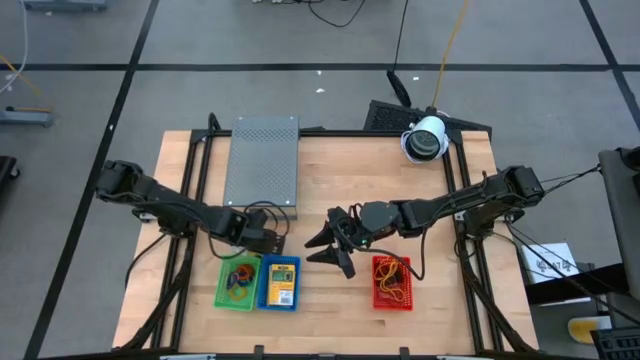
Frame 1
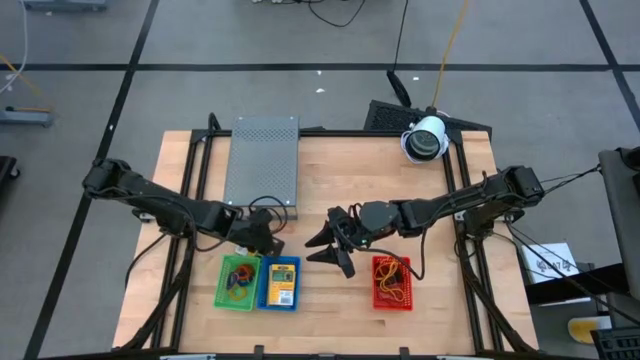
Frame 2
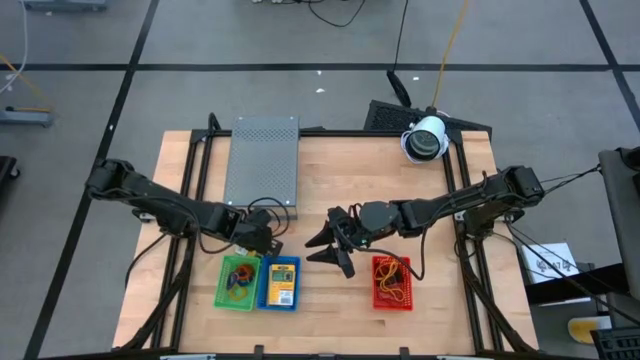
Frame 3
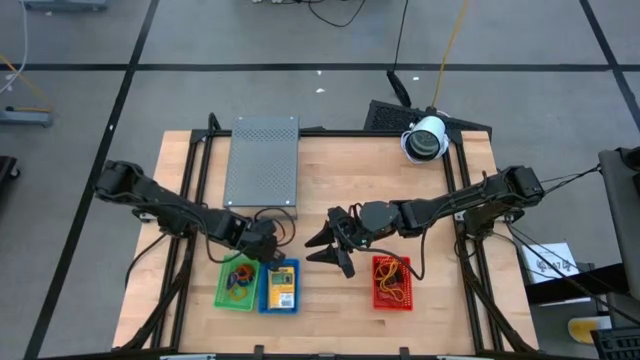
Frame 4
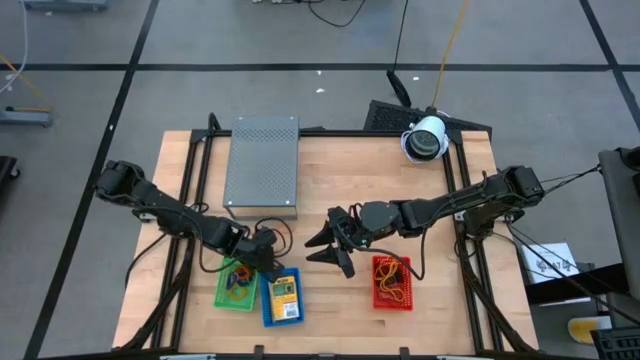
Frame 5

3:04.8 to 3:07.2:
Task: Pick & Place Office Desk Supplies
Adjust the blue bin from the table

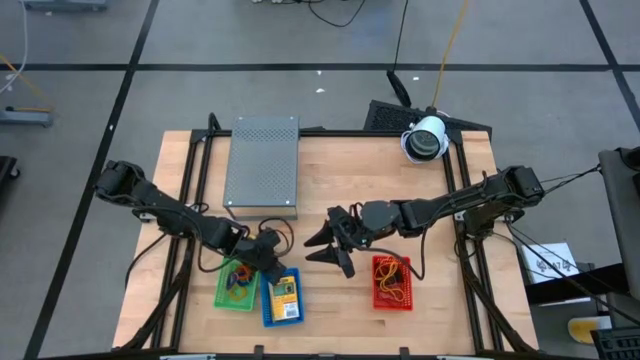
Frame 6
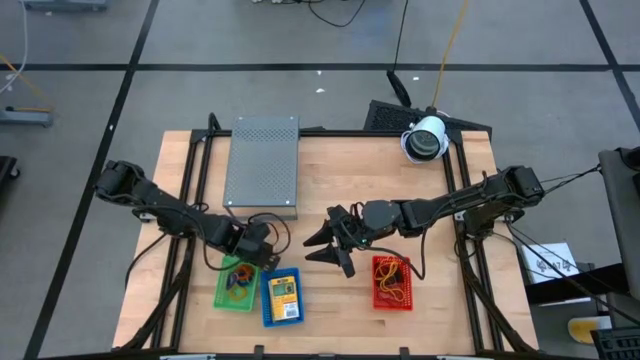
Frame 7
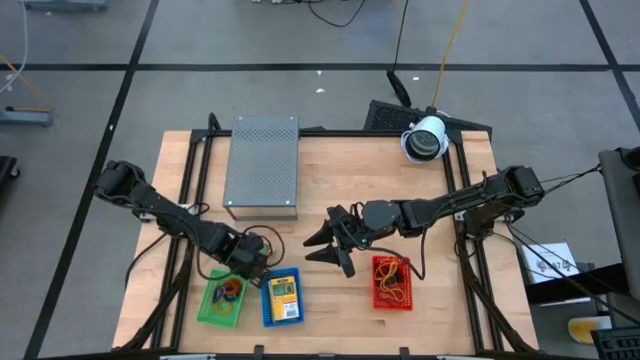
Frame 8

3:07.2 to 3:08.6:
Adjust the green bin from the table

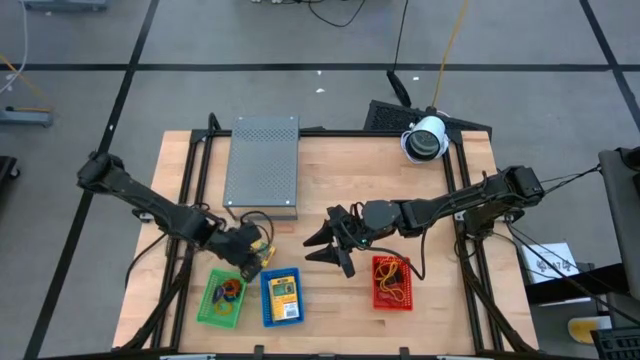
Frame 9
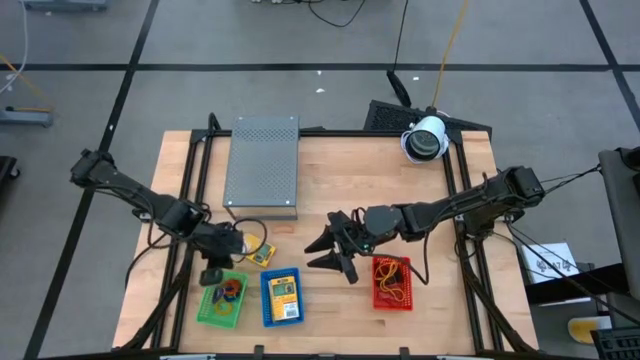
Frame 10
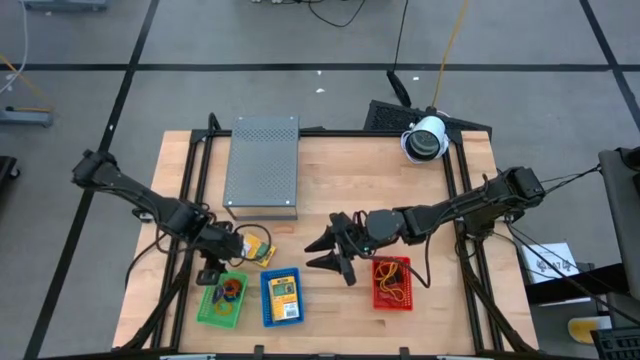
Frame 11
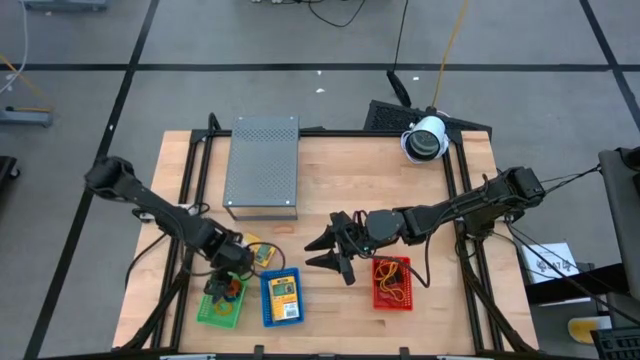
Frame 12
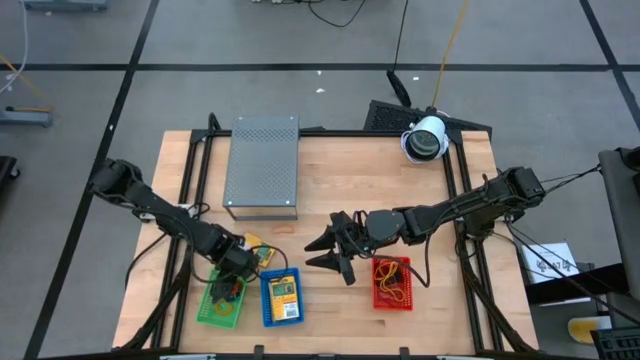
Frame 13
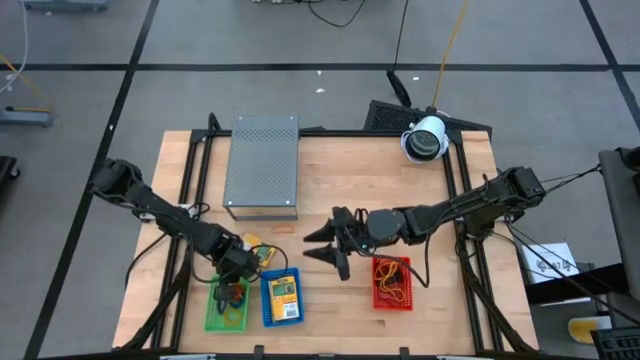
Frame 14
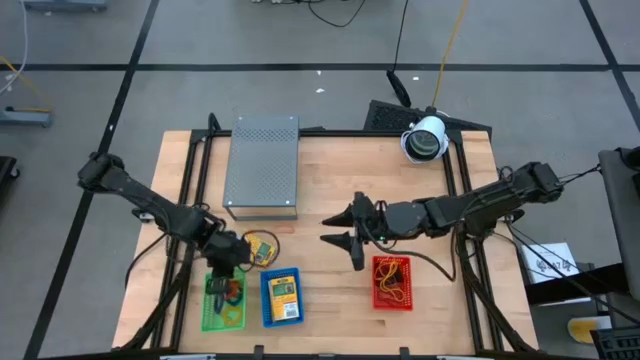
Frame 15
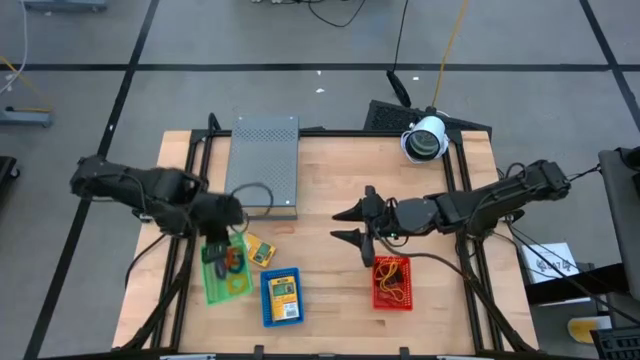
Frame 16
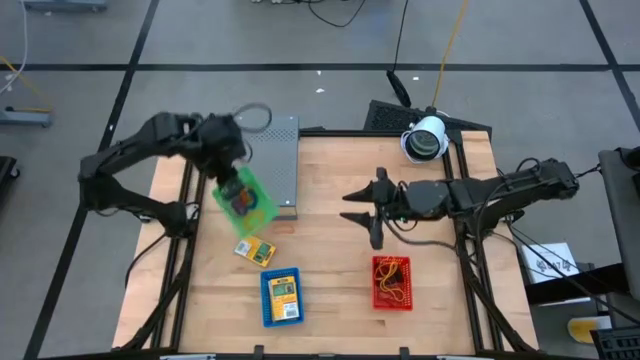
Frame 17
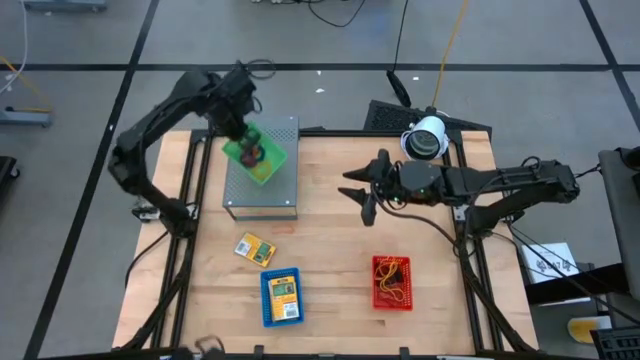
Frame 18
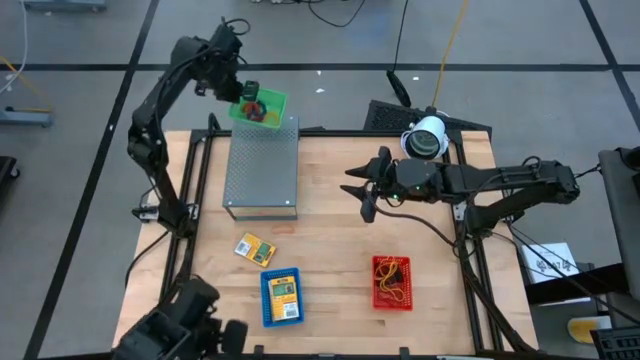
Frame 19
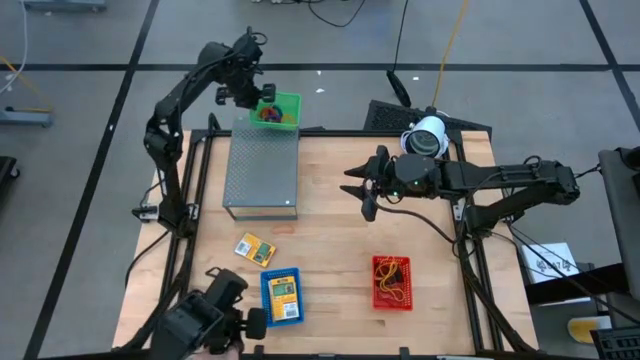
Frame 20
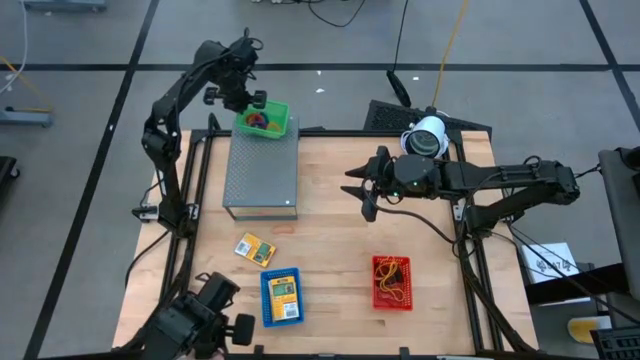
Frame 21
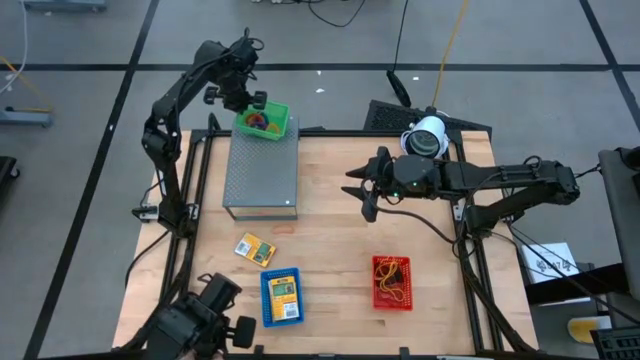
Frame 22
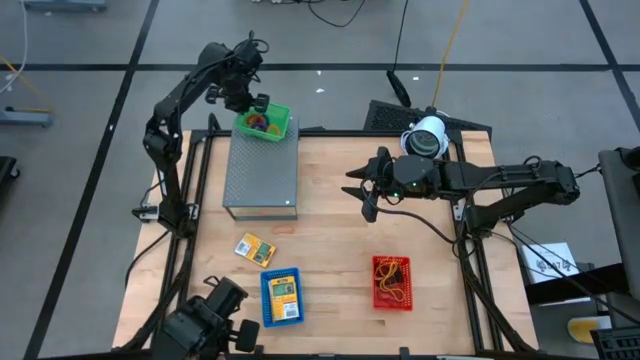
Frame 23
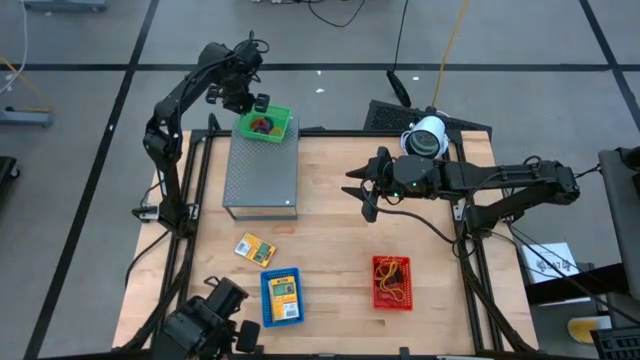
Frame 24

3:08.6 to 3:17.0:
Put the green bin on the shelf with spring rubberbands

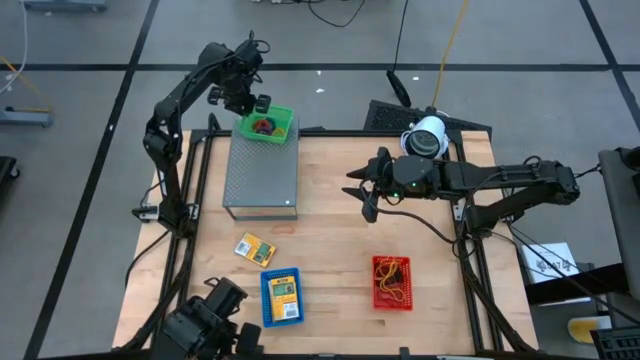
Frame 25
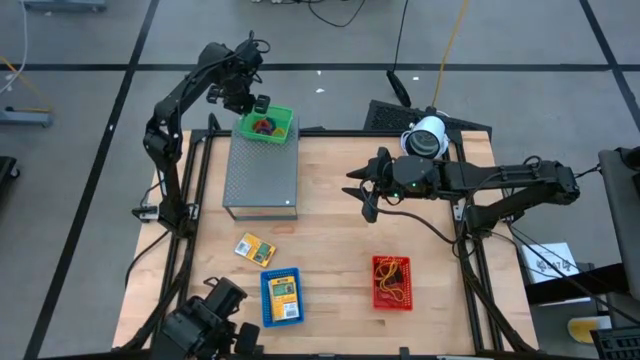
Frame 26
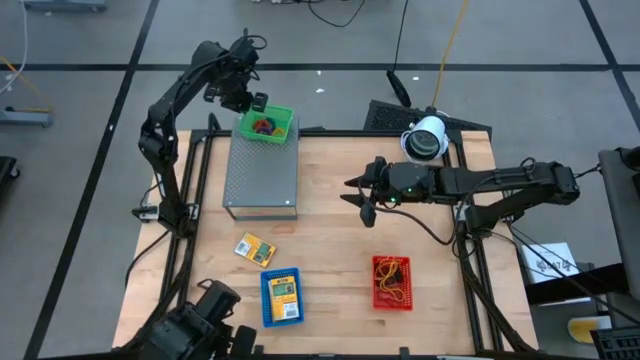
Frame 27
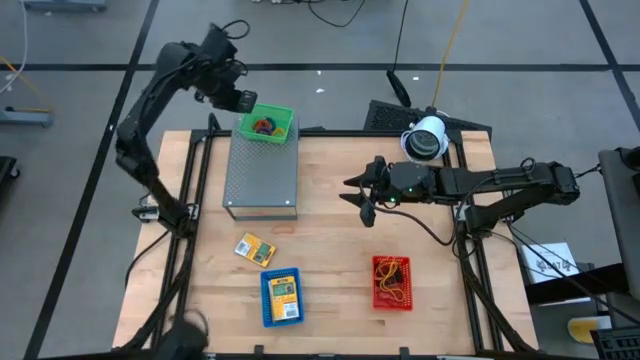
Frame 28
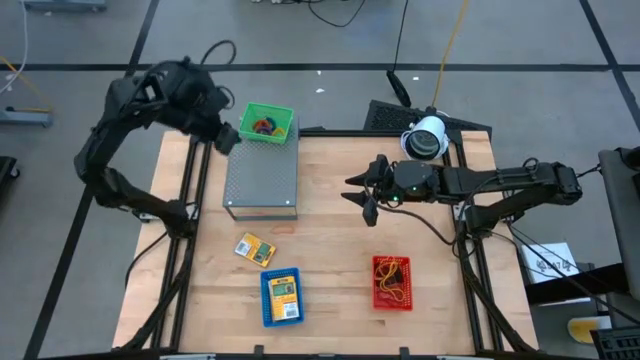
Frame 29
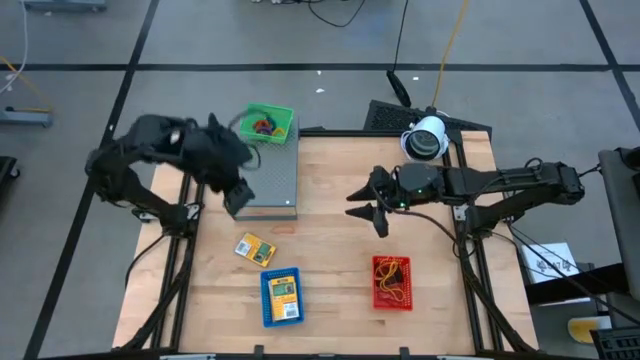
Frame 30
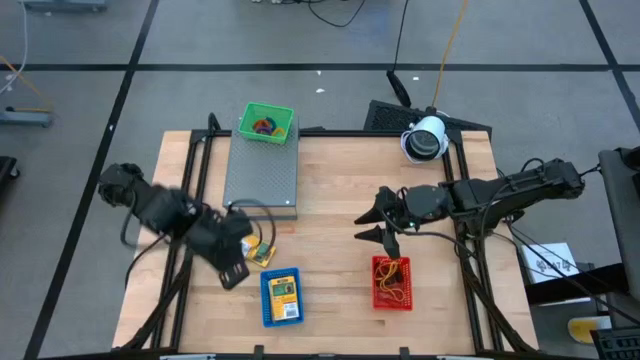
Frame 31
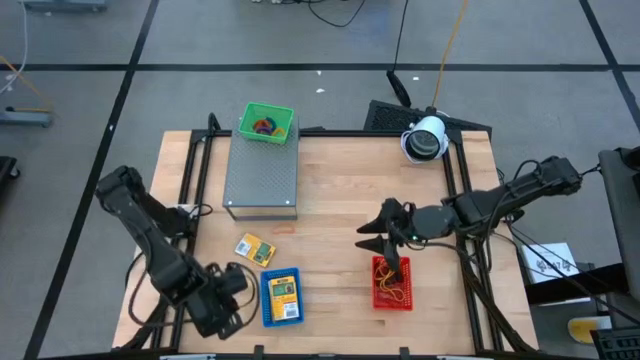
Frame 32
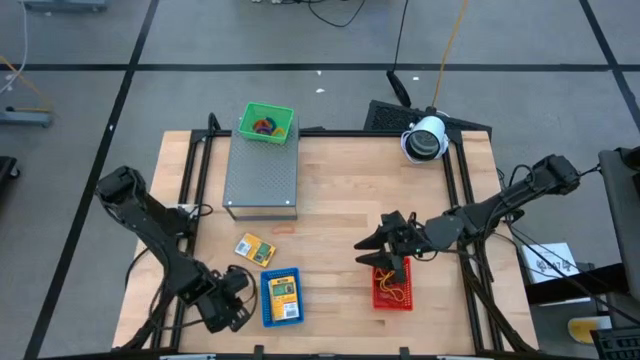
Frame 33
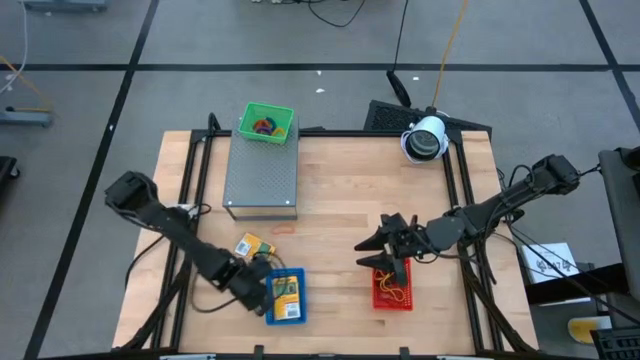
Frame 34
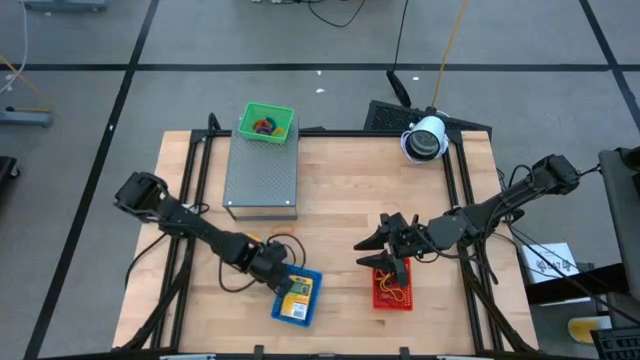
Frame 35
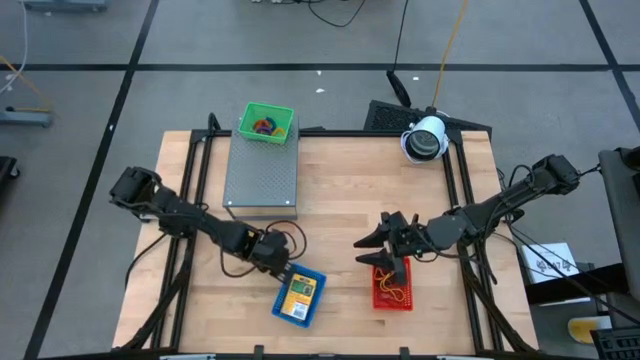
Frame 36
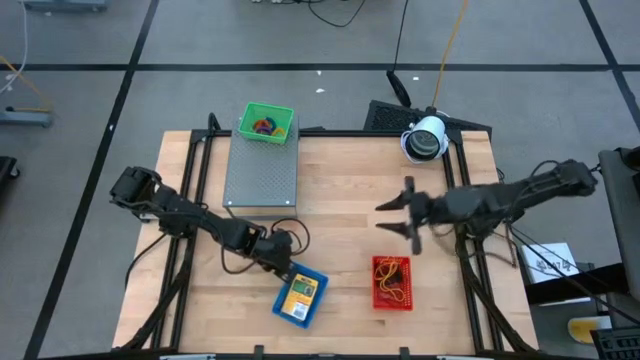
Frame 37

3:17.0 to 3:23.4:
Adjust the blue bin from the table

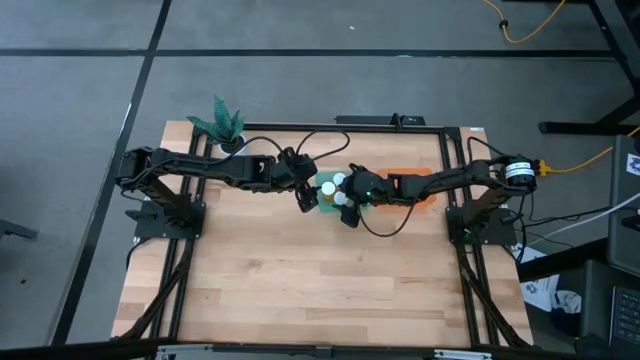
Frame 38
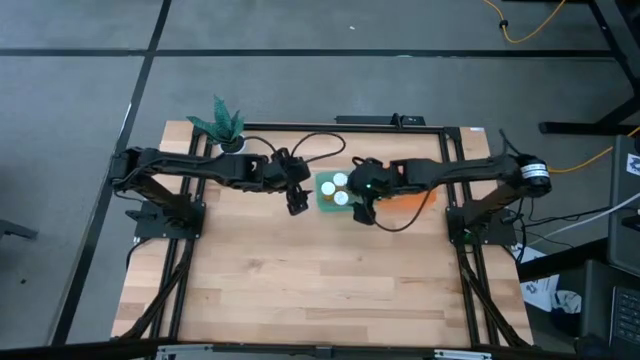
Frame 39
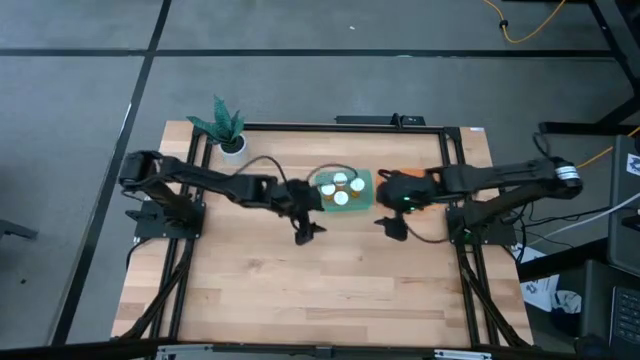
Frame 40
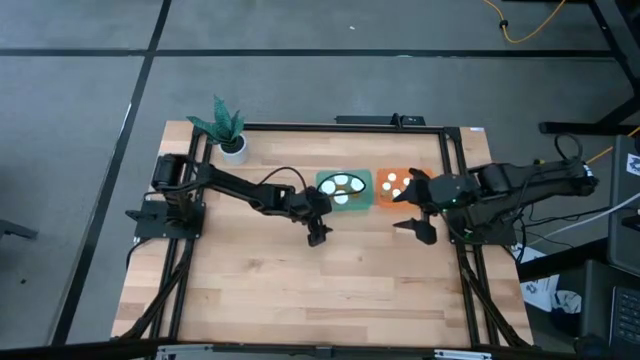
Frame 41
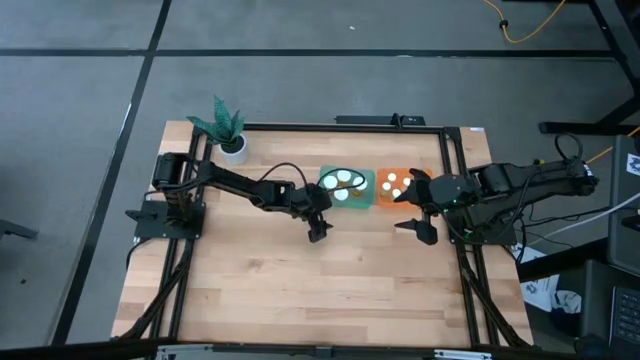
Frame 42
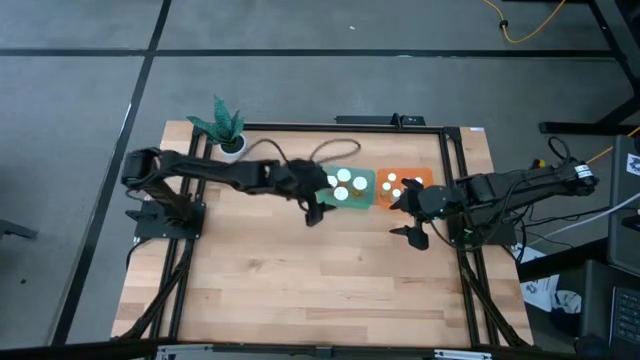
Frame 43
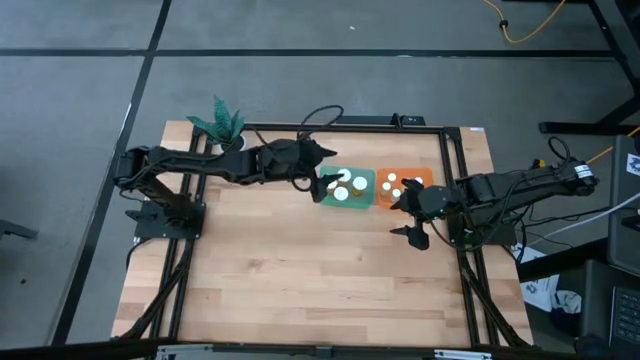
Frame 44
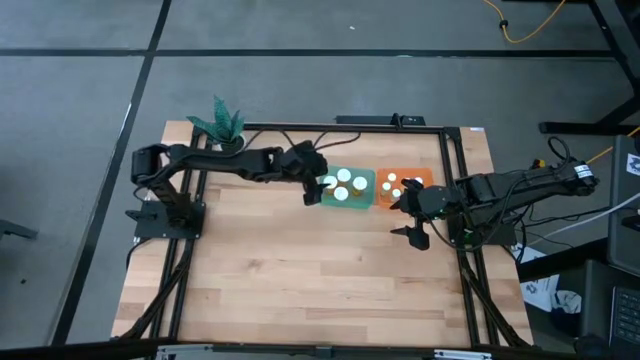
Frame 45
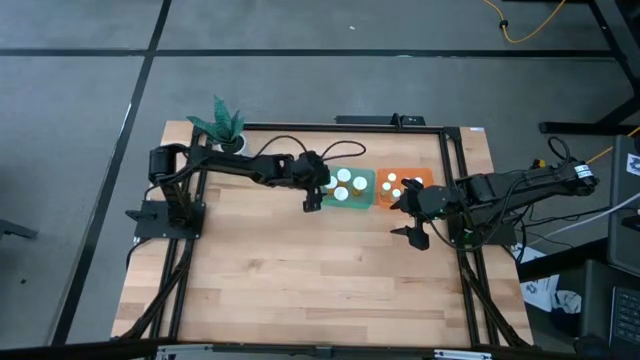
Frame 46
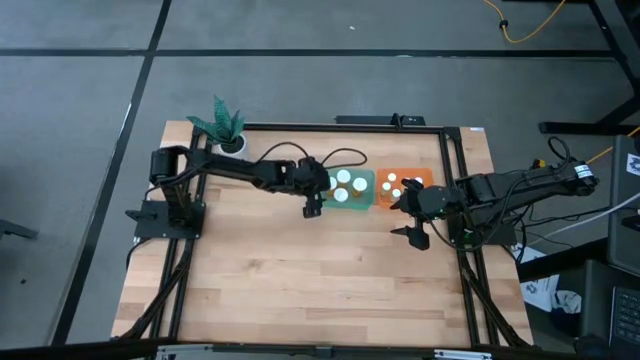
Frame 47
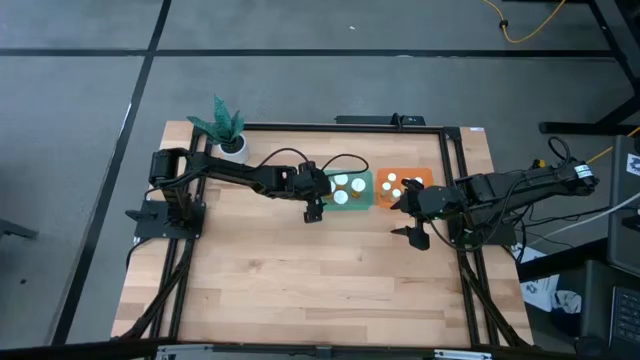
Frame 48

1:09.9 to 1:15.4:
Task: Pick and place medicine bottles into bin by pill shape (circle, oval)
Adjust the green bin
